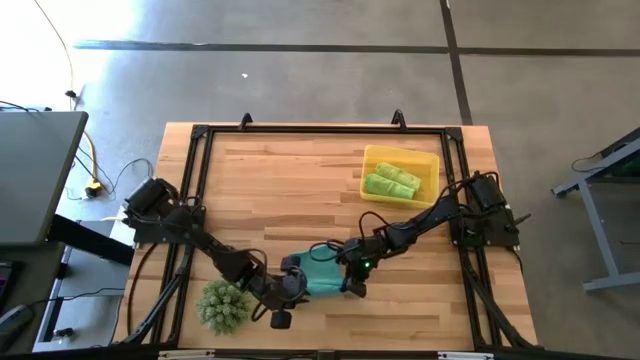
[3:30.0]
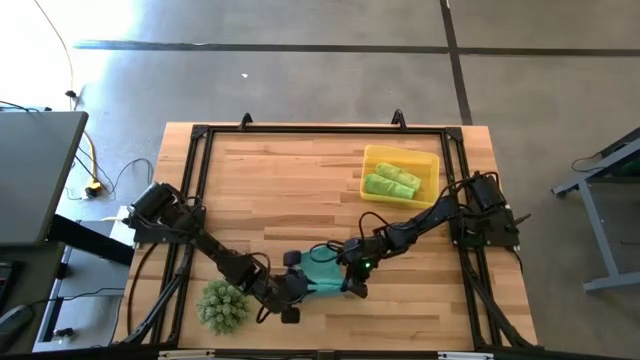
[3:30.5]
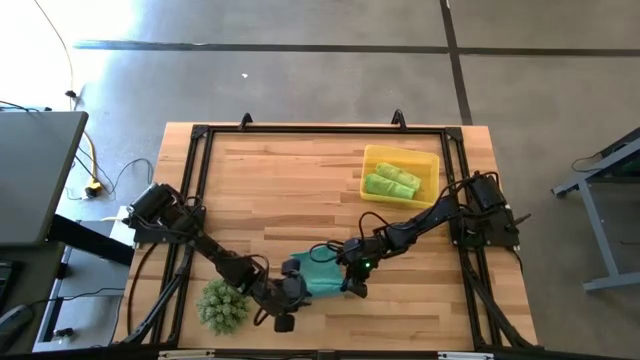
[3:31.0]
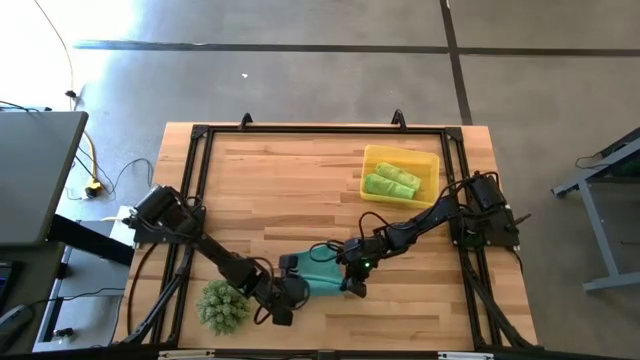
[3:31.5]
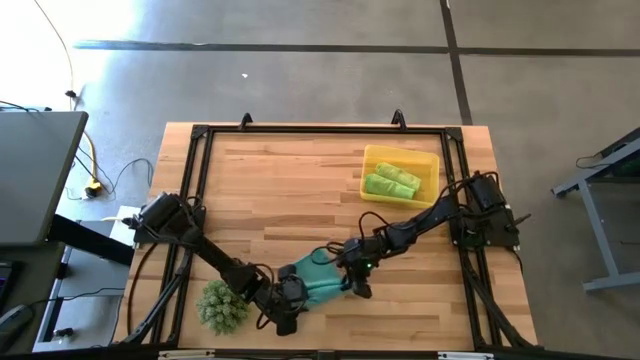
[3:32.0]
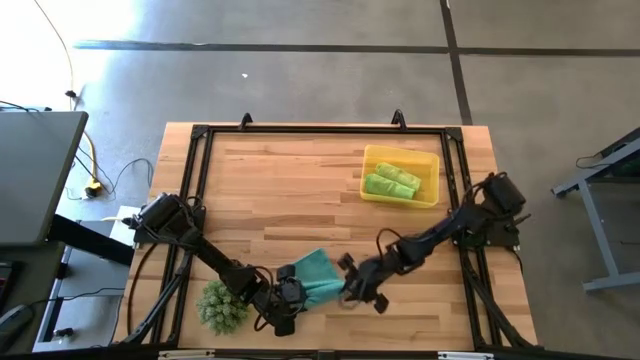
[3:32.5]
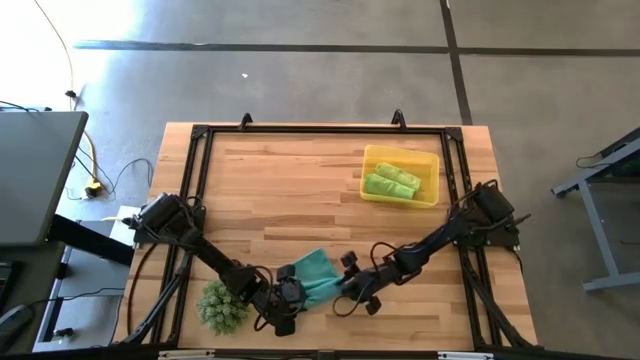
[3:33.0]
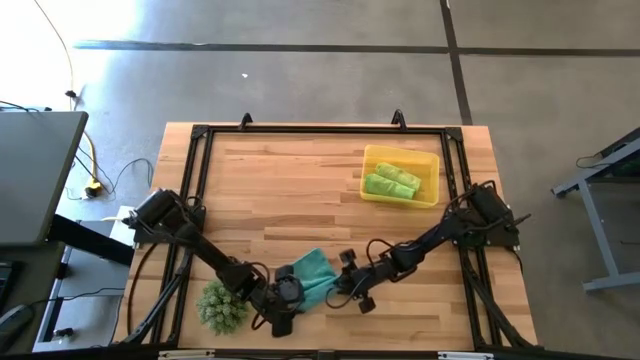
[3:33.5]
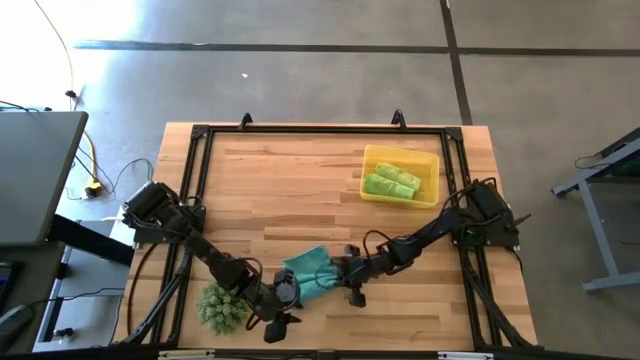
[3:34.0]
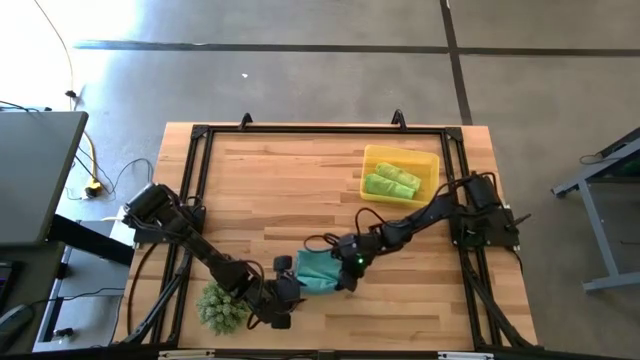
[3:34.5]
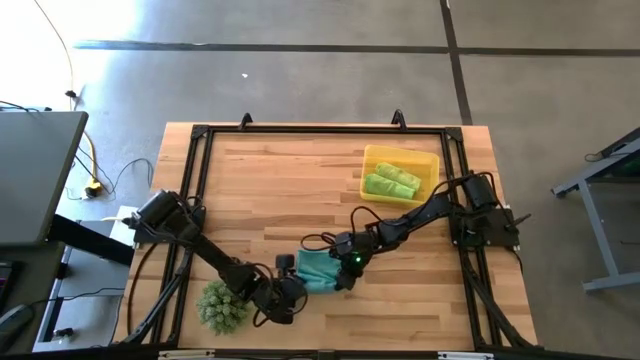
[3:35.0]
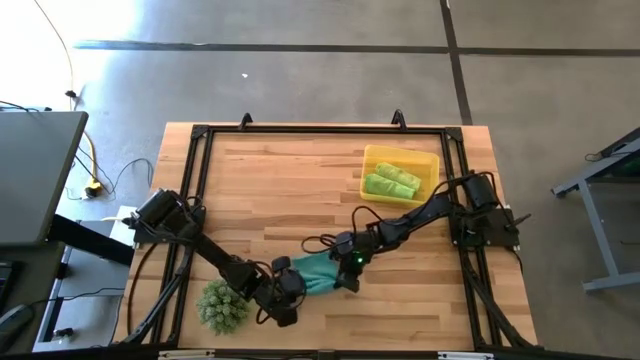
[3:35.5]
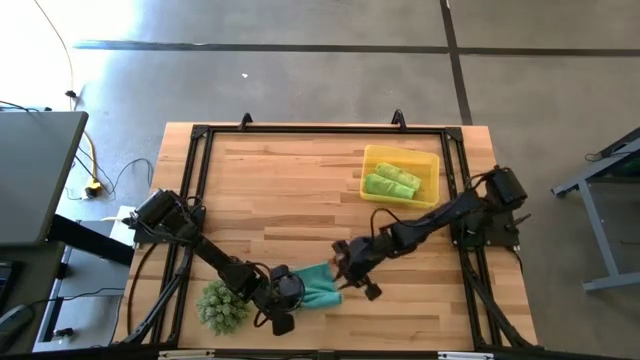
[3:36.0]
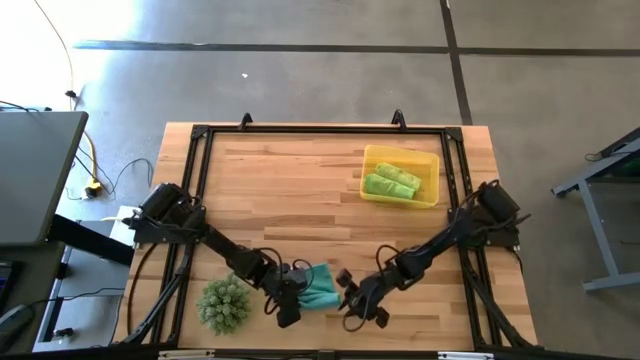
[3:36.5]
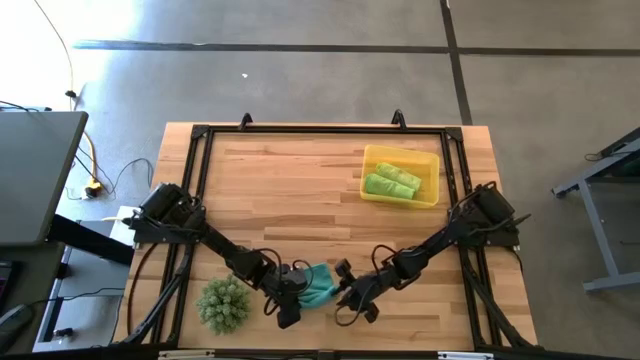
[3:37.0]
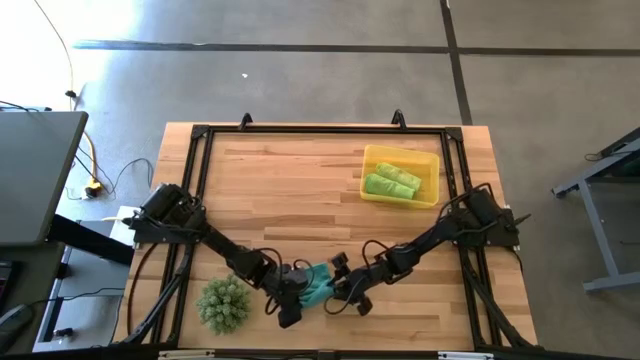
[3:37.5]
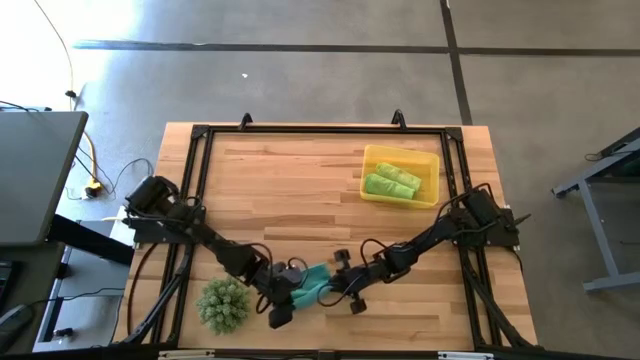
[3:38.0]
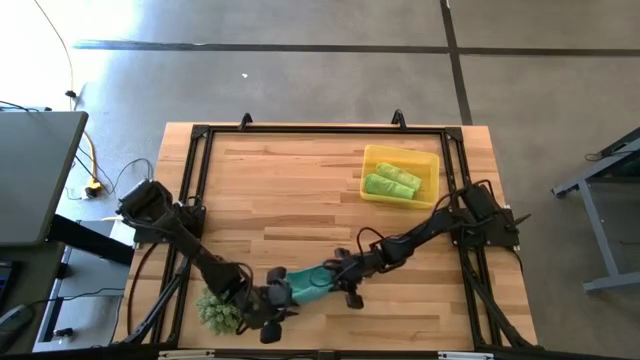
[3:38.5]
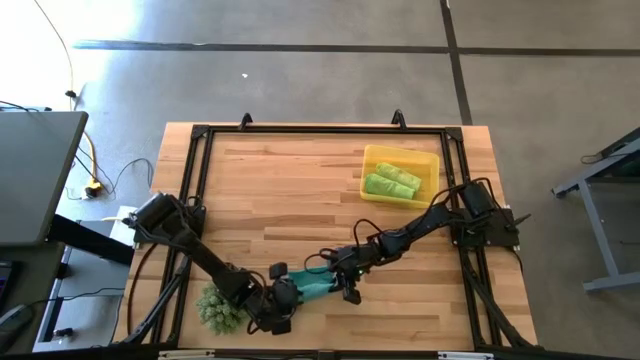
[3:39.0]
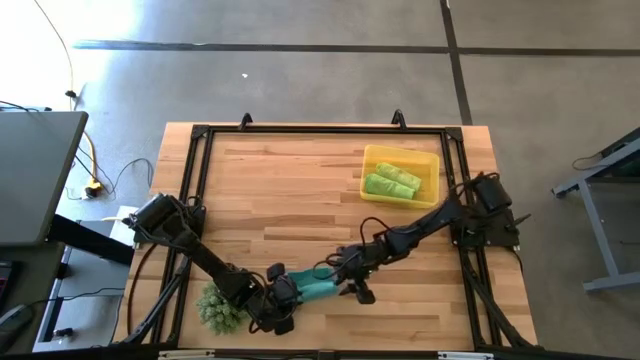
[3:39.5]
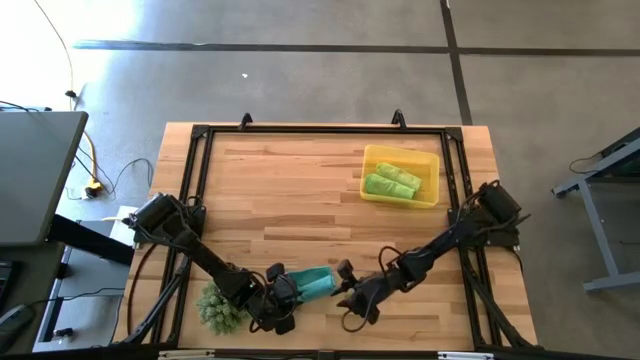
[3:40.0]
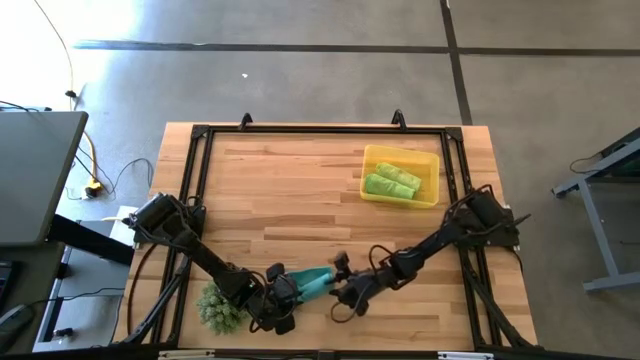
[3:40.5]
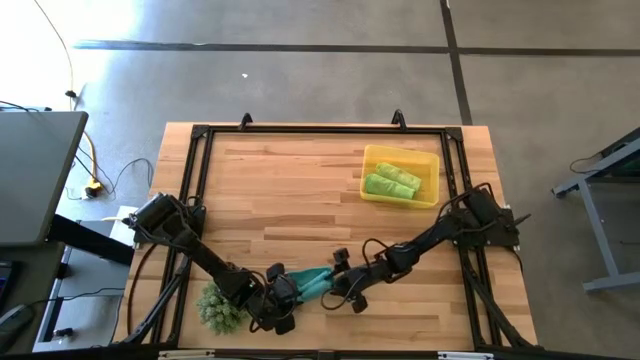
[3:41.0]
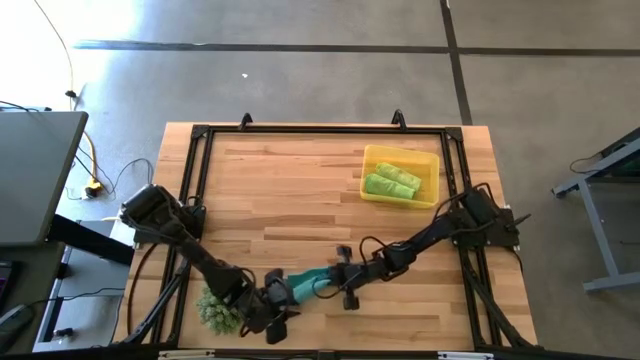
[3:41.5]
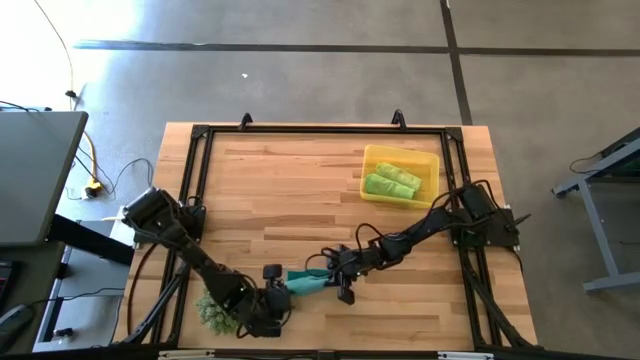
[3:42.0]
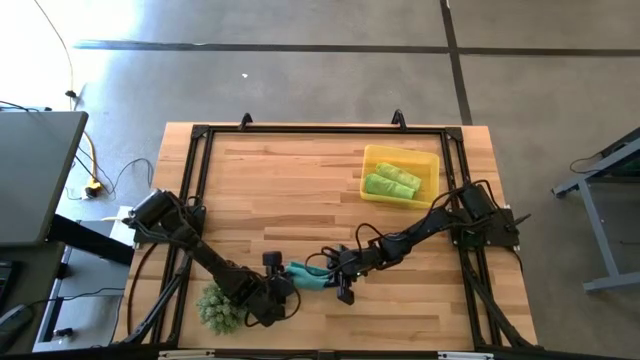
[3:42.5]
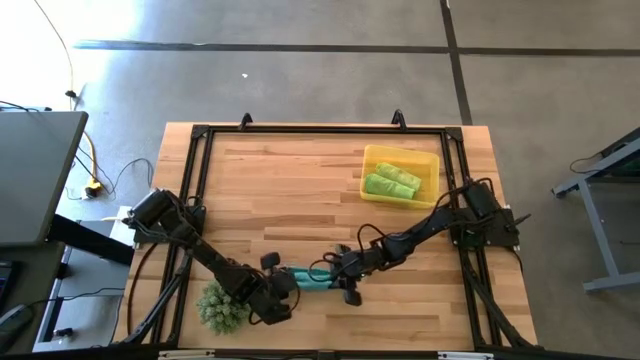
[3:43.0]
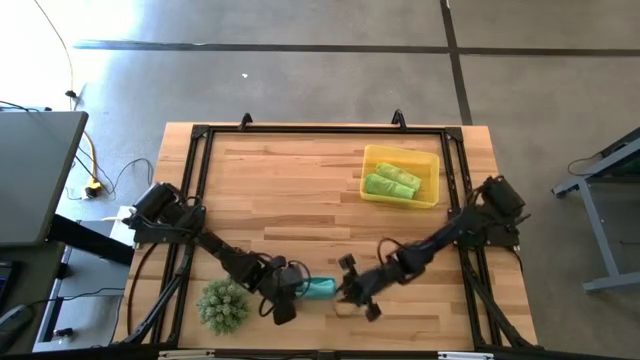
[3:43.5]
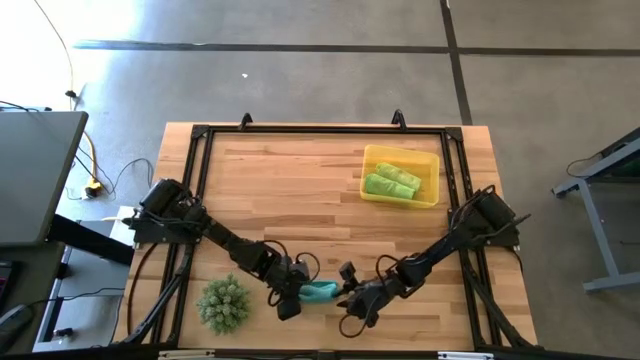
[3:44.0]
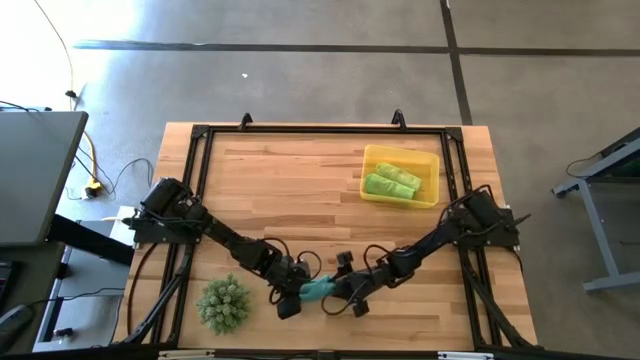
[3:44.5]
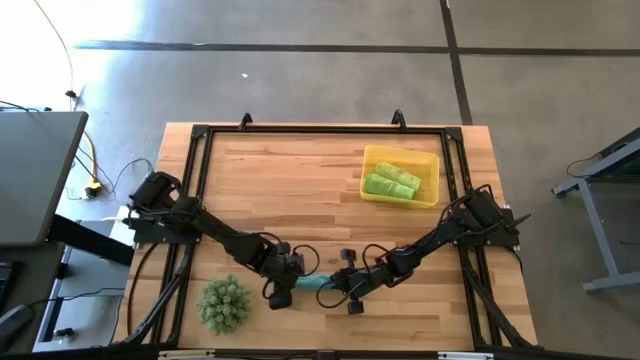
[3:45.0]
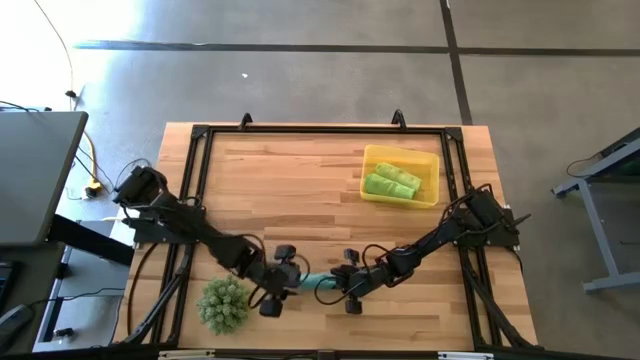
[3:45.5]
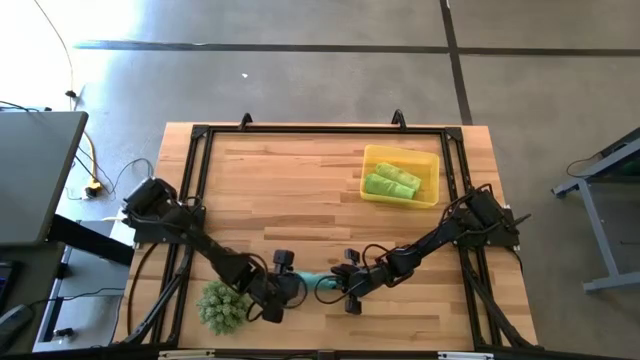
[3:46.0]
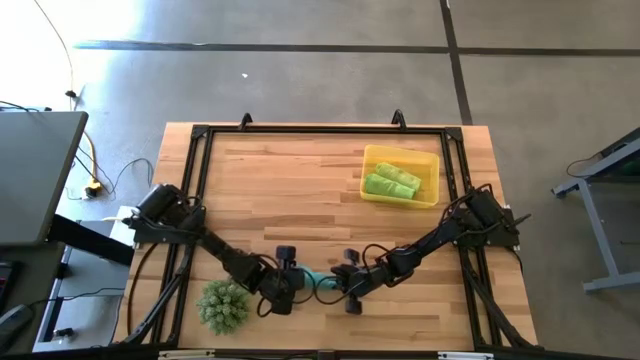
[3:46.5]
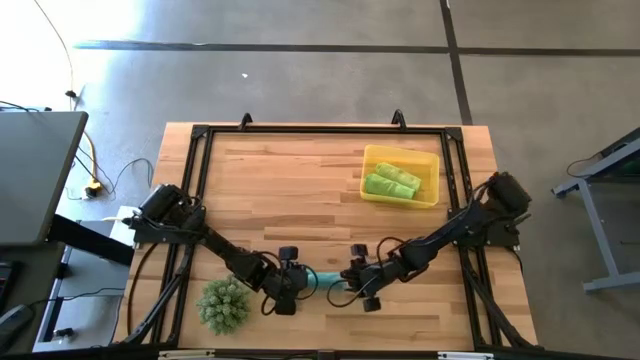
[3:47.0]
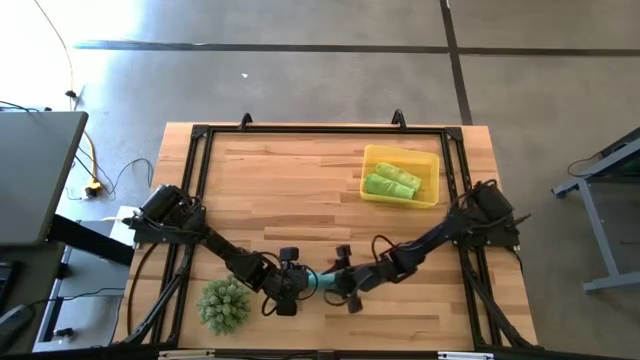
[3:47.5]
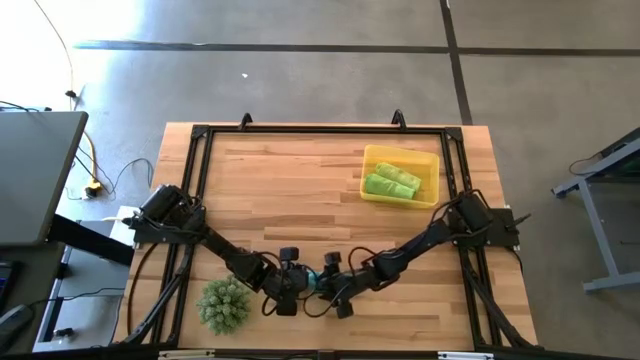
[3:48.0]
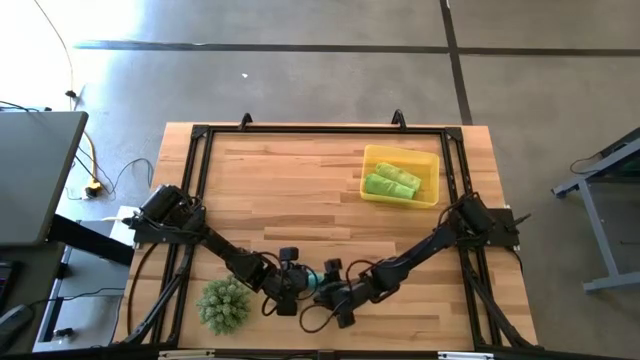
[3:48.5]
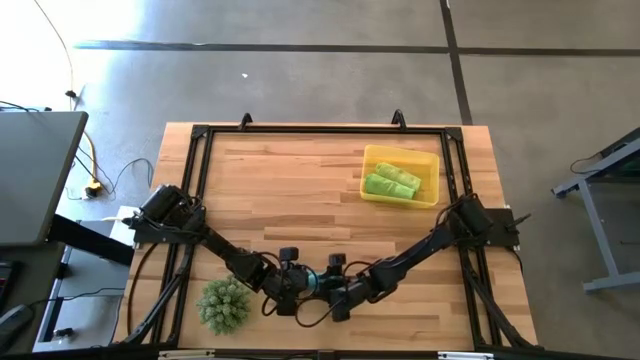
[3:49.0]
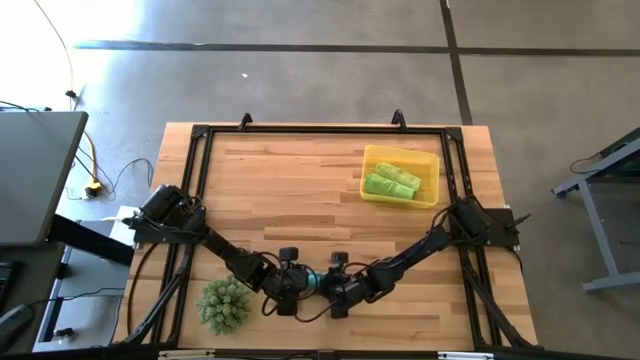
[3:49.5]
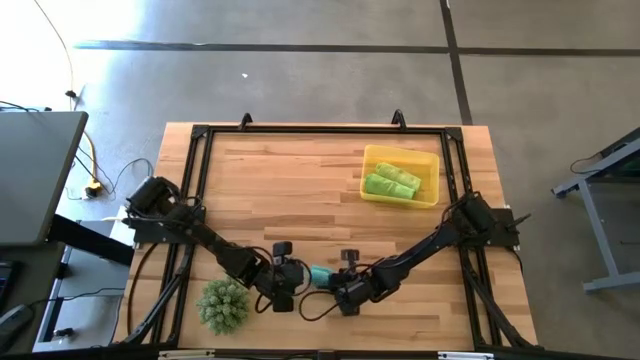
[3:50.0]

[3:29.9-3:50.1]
Task: Roll microfiber towels into tight, uniform cylinder then place into a basket
Roll the blue towel

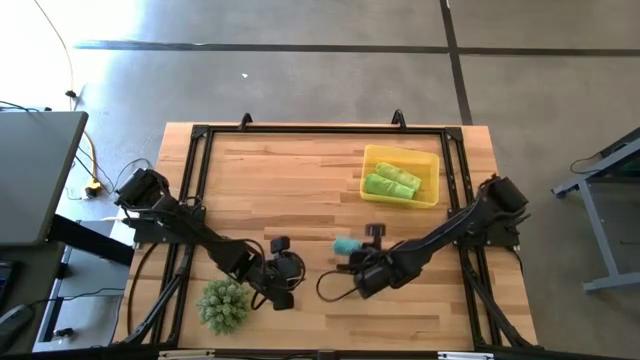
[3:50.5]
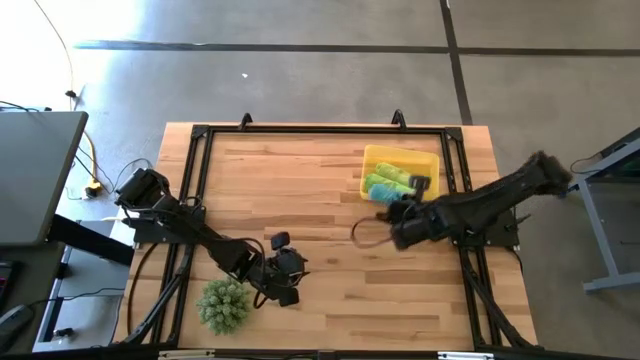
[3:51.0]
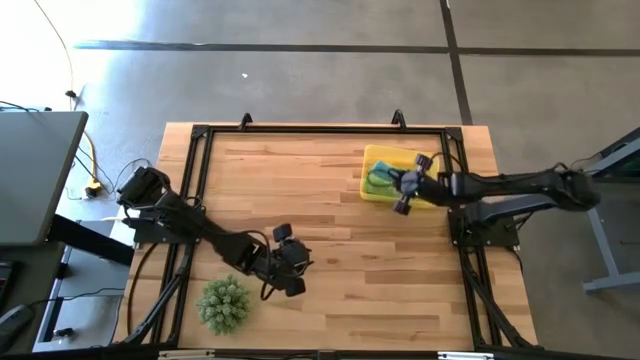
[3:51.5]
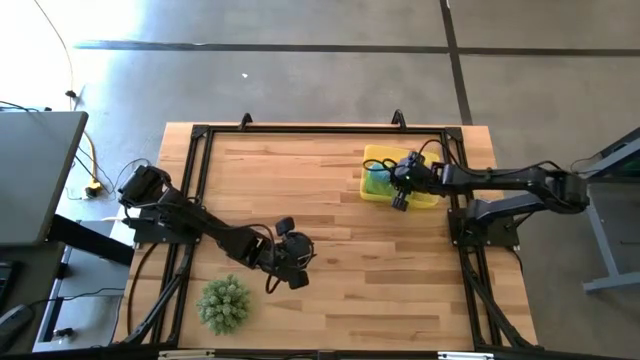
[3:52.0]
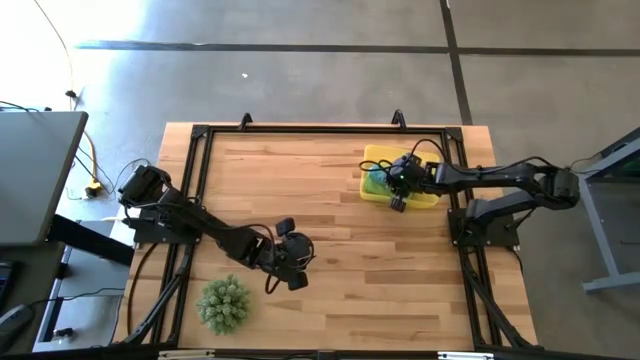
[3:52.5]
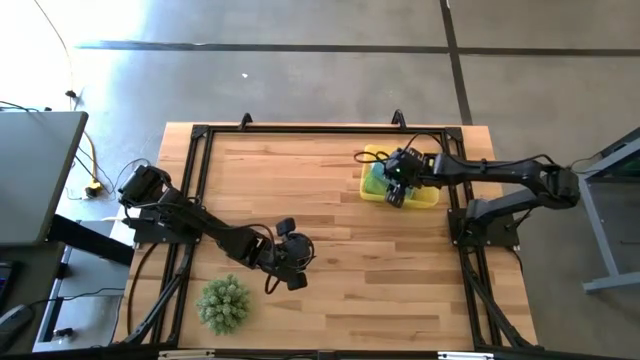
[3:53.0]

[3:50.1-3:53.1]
Put the blue towel into the bin
